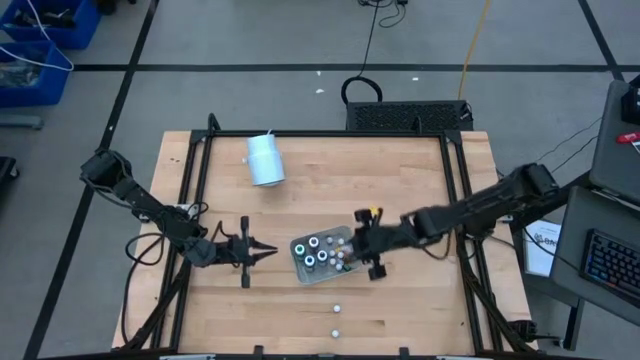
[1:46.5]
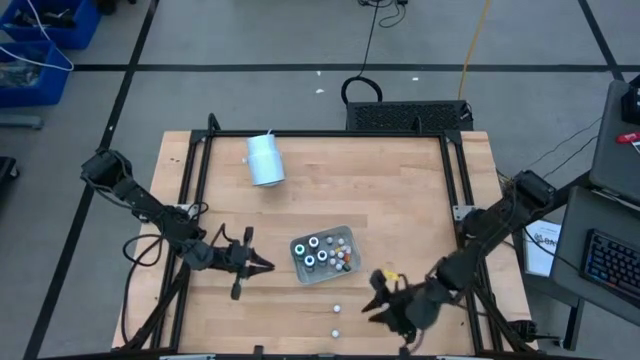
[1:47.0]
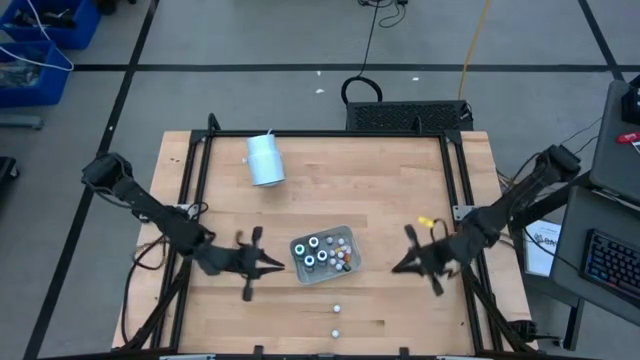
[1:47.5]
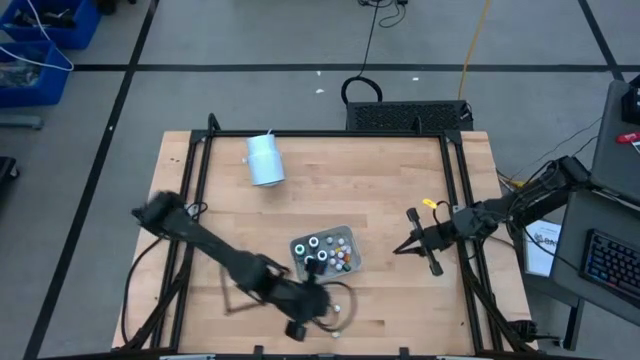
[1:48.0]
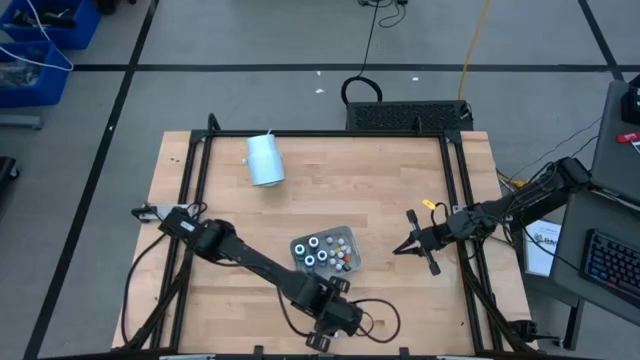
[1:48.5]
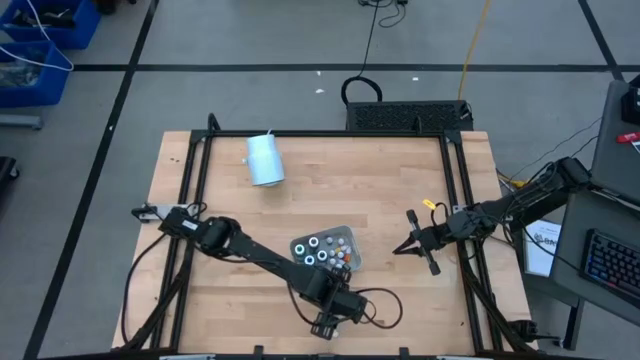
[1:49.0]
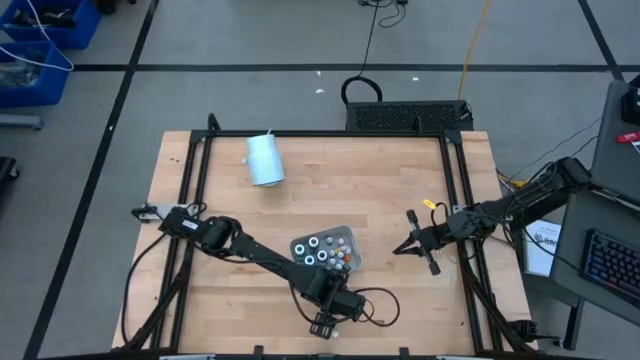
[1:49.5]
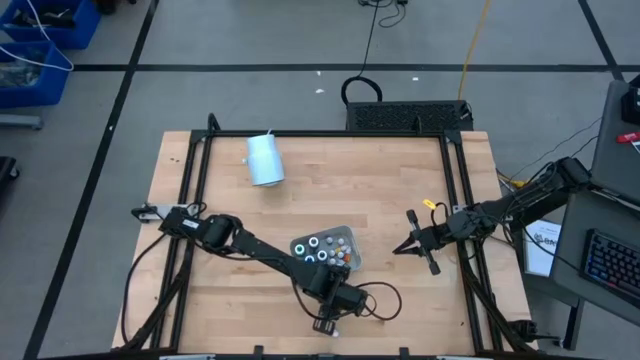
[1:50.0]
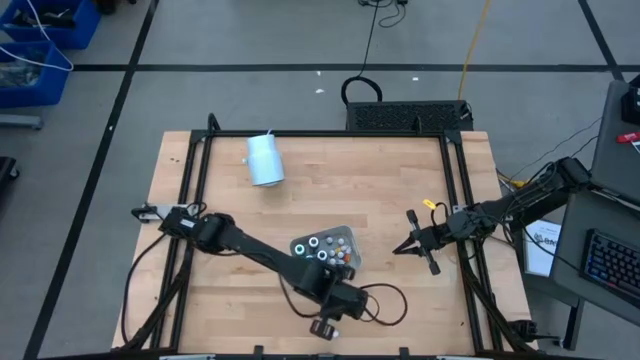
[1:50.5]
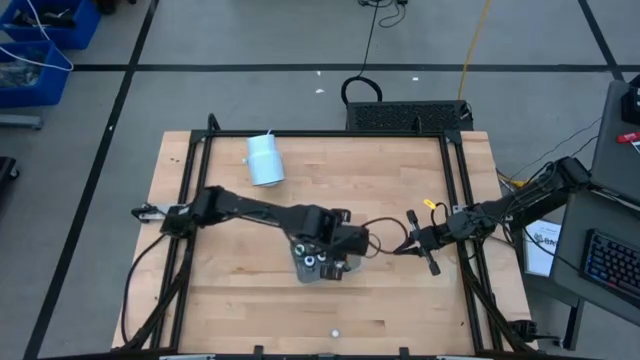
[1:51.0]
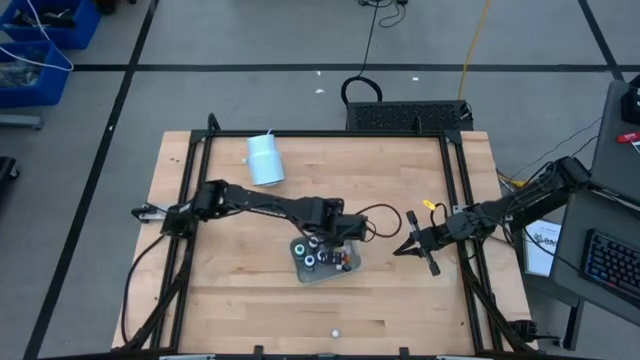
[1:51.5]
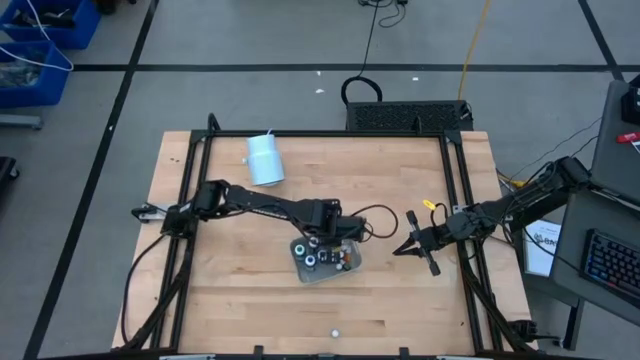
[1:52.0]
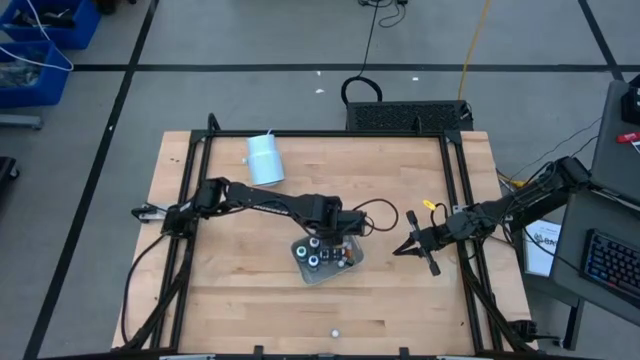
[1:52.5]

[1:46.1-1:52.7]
Task: Pick & Place food coloring
Put the small purple food coloring bottle into the gray bin

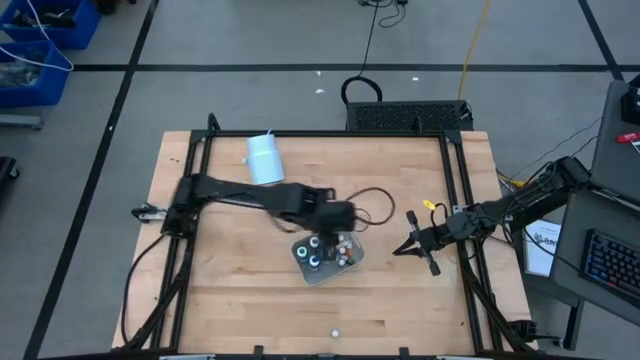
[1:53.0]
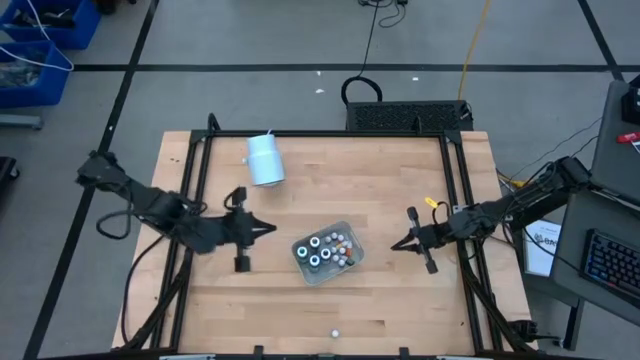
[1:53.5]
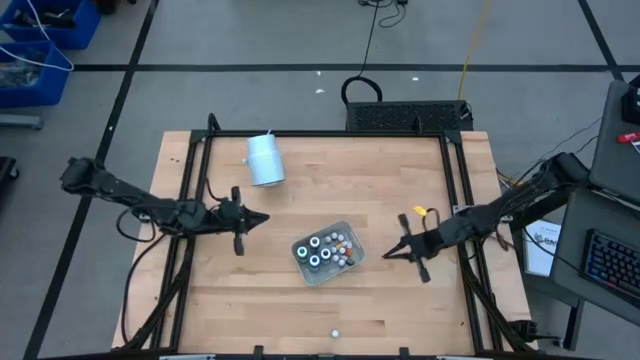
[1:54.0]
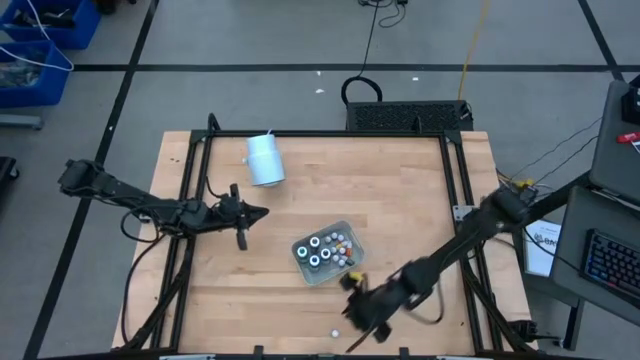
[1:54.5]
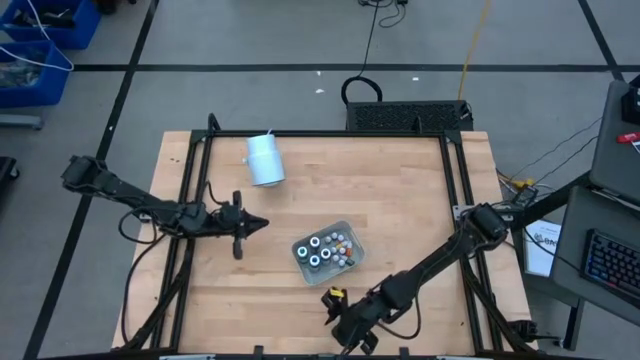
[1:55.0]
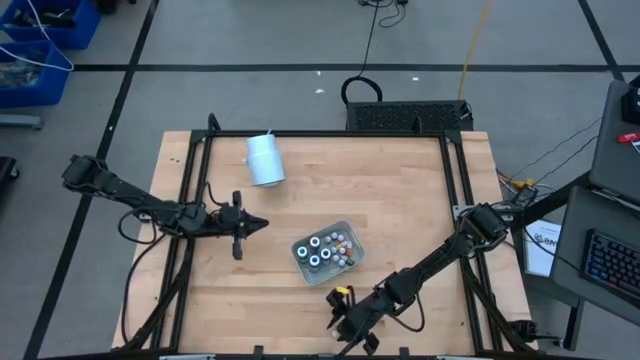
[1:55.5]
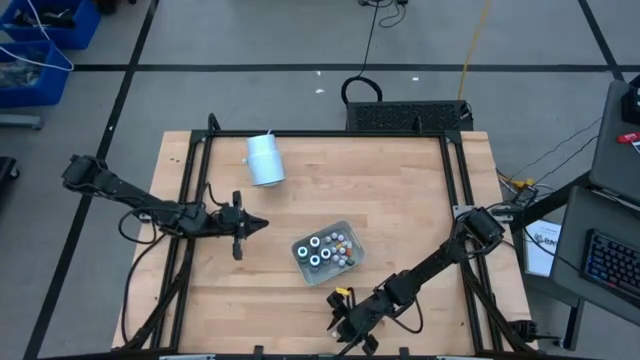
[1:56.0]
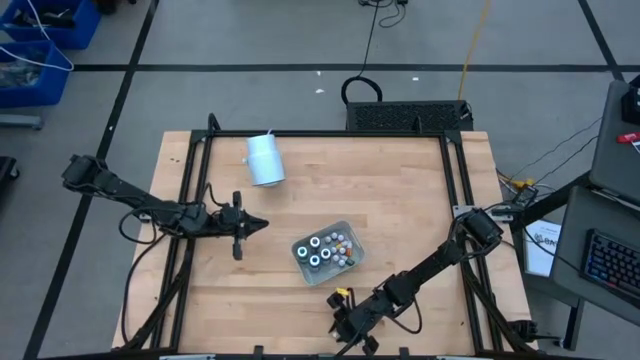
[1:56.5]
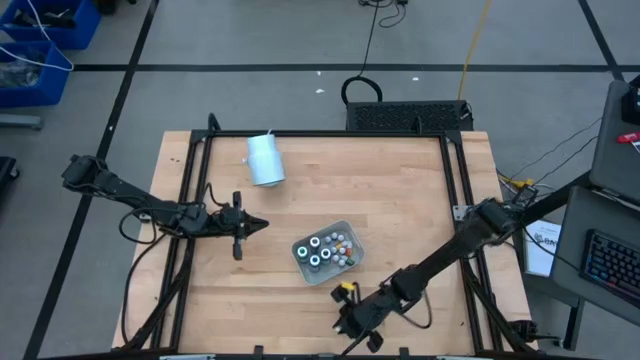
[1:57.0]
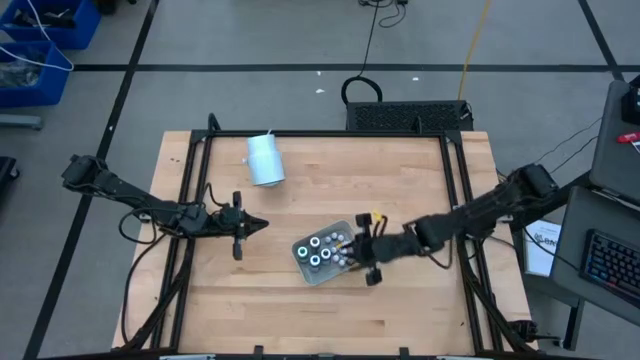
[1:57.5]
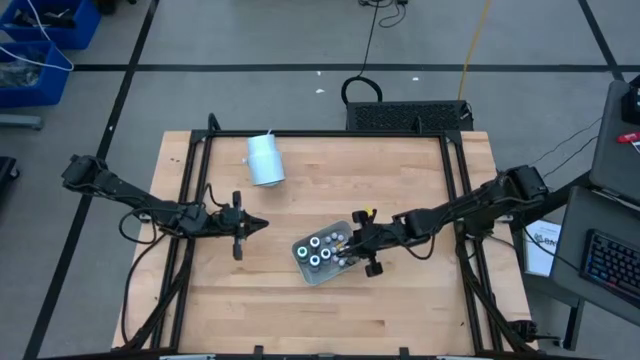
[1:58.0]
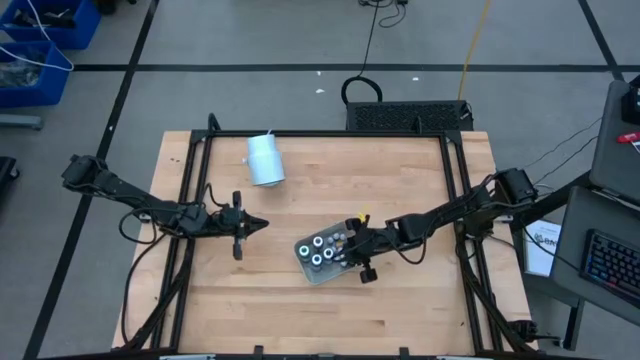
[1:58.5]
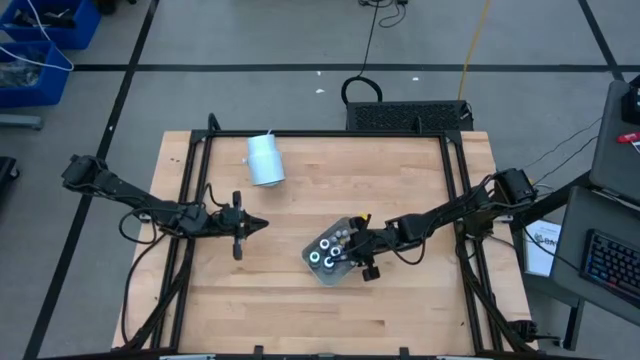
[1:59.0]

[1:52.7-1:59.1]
Put the small blue food coloring bottle into the gray bin

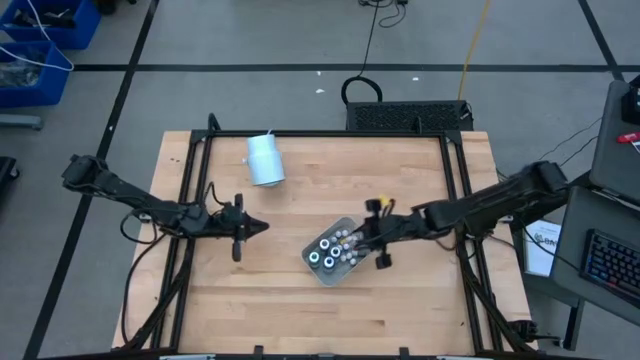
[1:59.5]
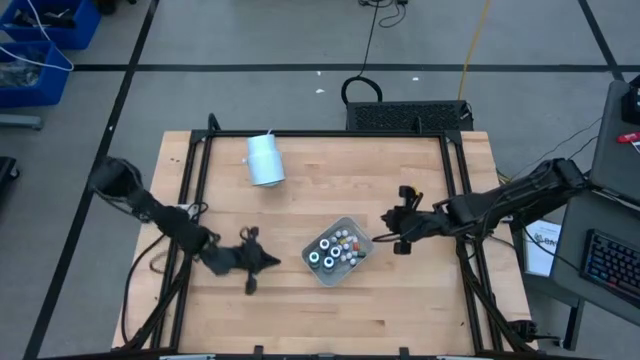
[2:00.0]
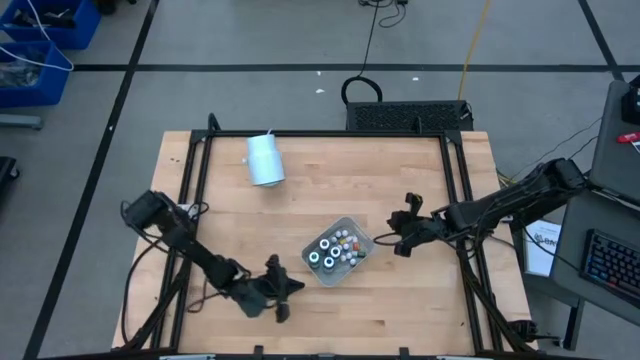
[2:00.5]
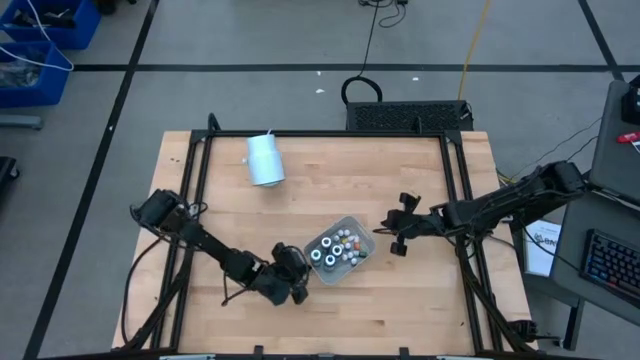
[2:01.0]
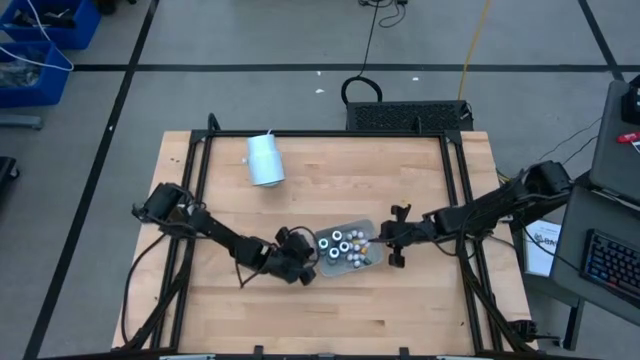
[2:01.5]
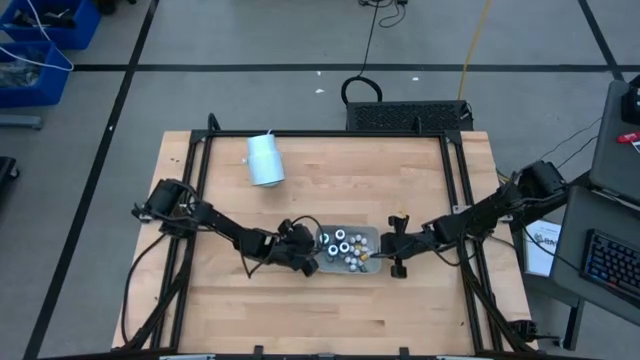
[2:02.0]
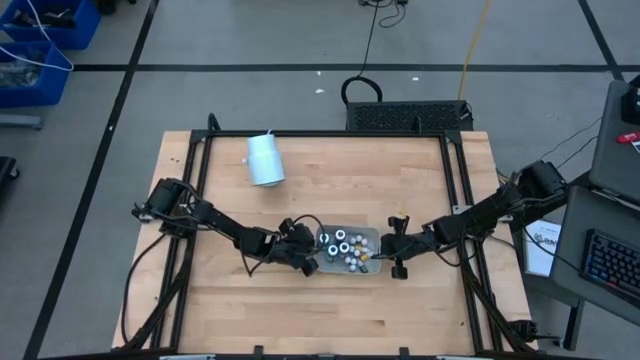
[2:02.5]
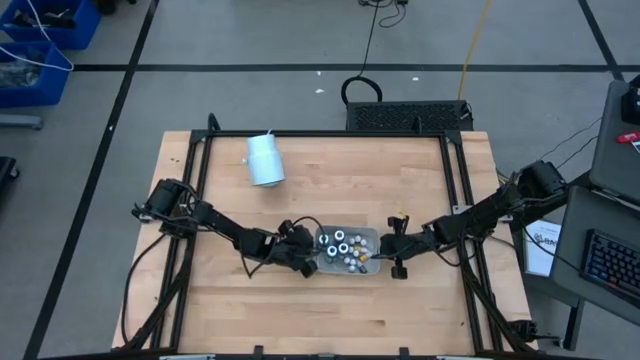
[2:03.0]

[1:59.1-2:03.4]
Adjust the gray bin on the table

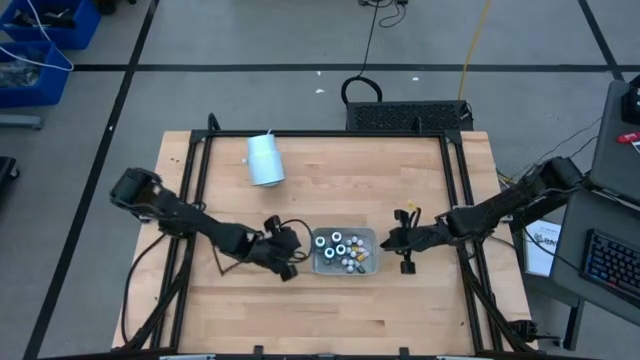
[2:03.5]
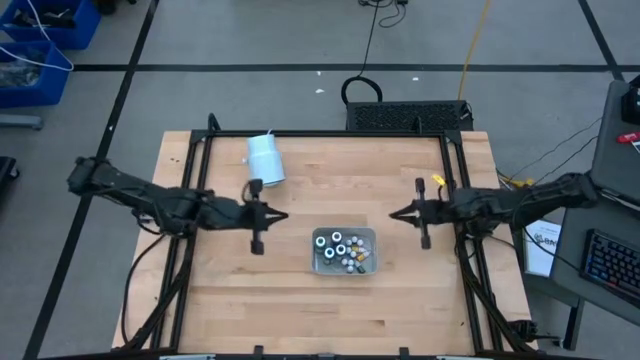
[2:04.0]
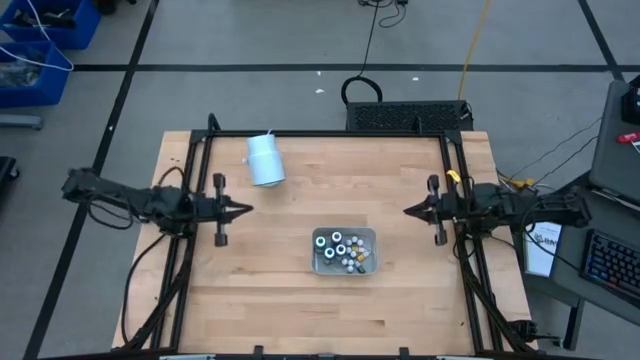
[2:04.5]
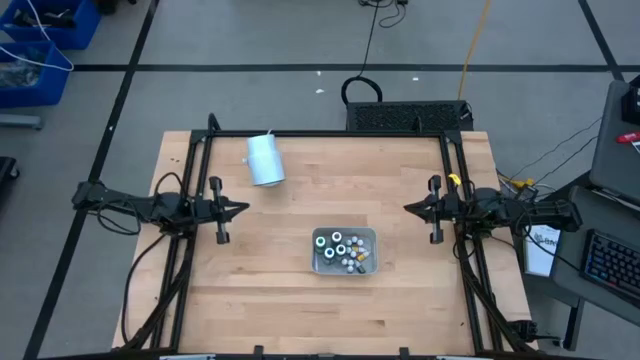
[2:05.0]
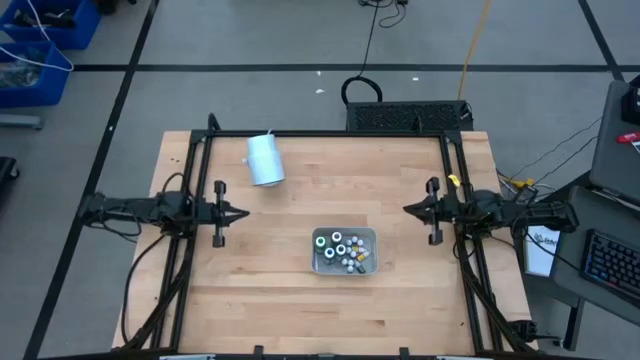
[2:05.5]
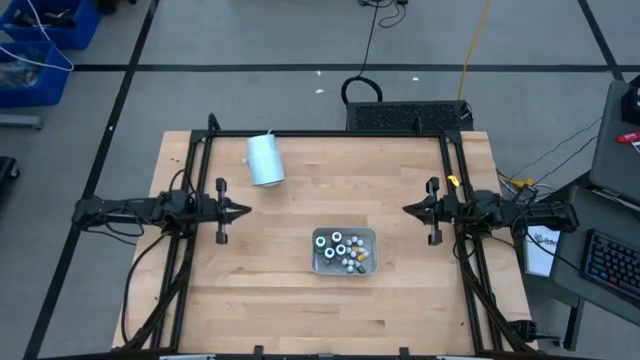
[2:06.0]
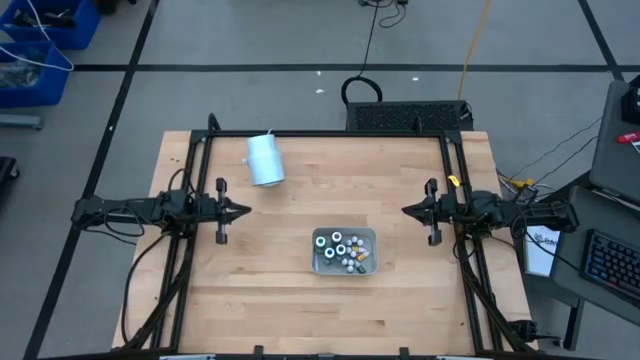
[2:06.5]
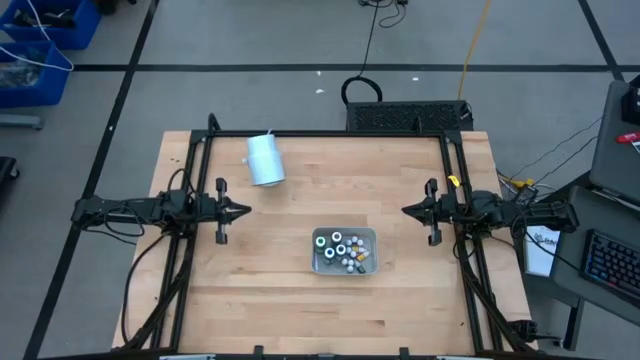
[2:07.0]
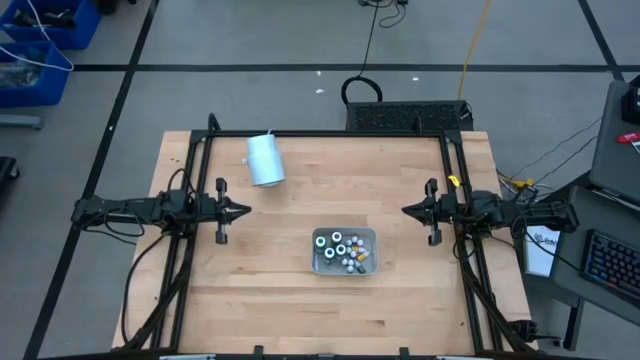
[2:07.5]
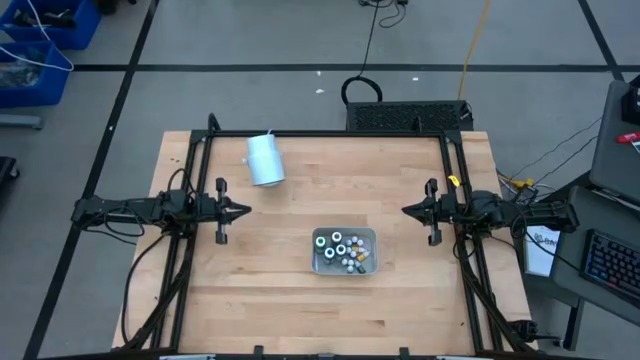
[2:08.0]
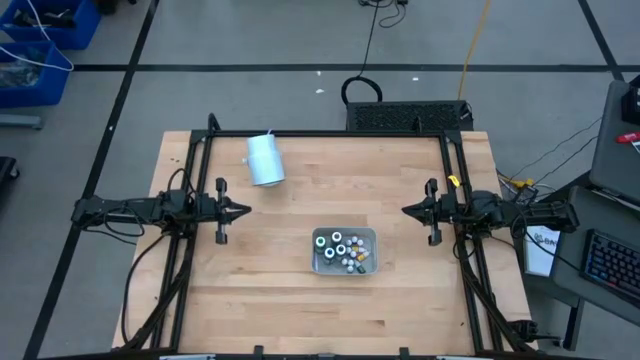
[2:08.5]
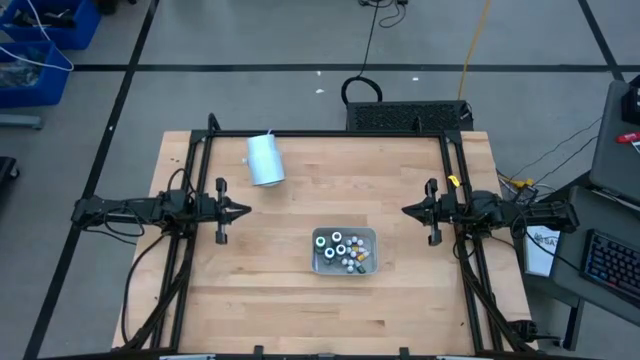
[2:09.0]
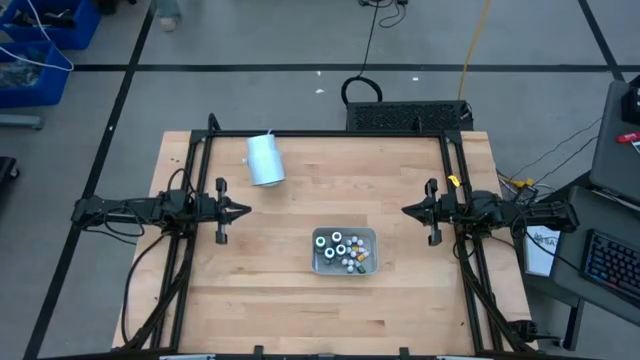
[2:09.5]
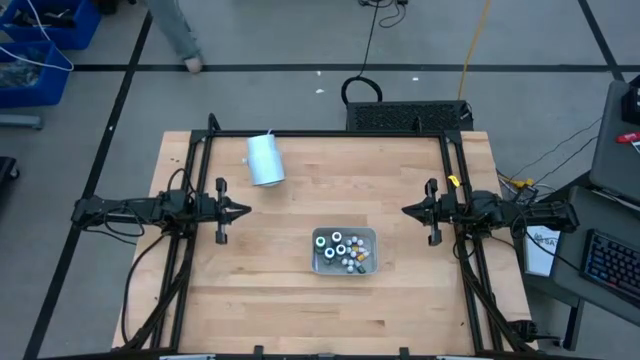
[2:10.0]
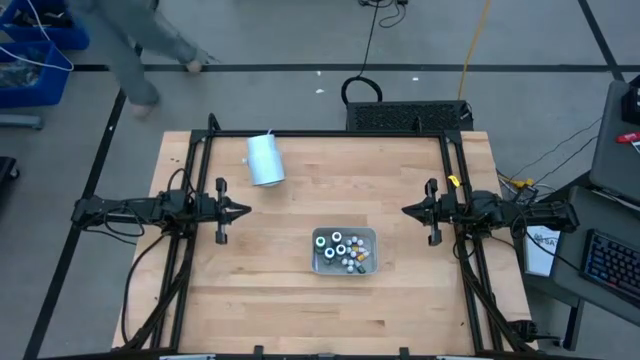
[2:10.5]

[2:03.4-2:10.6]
Return to Home Position
